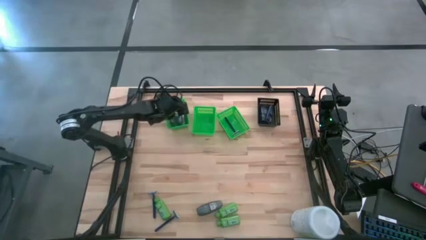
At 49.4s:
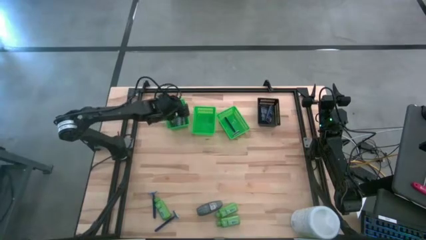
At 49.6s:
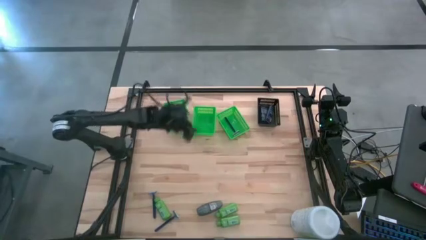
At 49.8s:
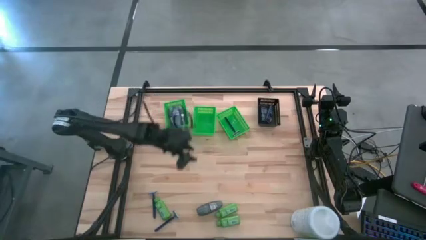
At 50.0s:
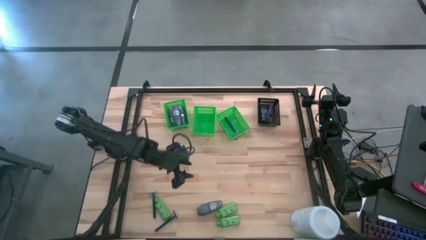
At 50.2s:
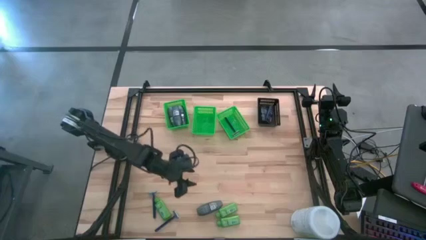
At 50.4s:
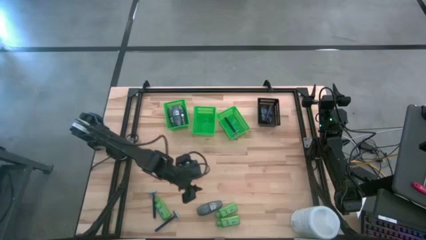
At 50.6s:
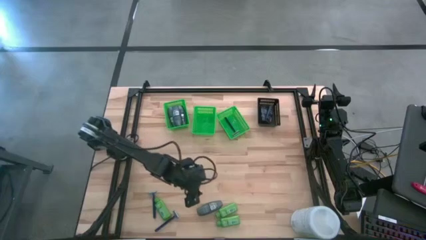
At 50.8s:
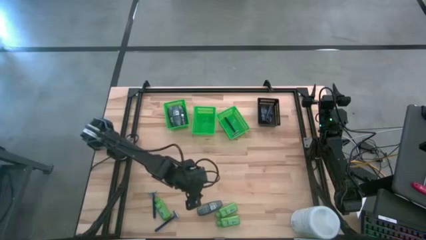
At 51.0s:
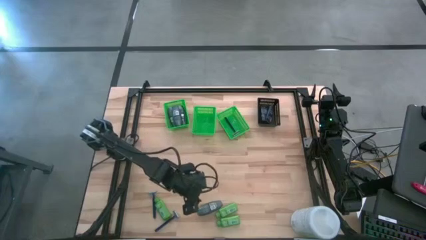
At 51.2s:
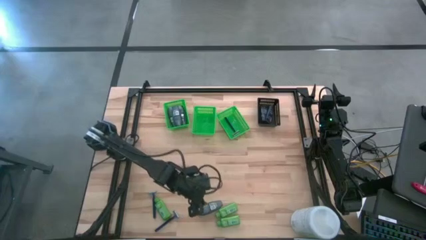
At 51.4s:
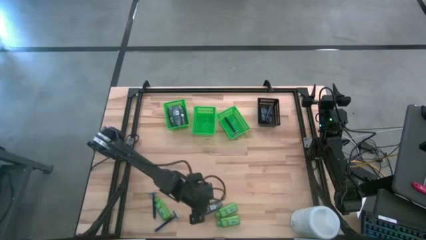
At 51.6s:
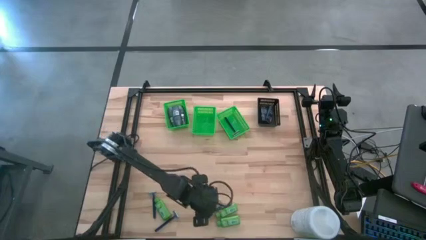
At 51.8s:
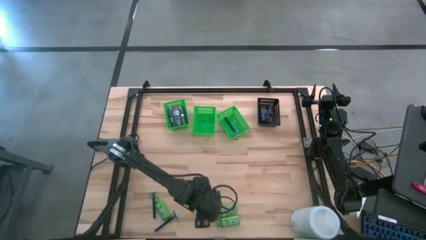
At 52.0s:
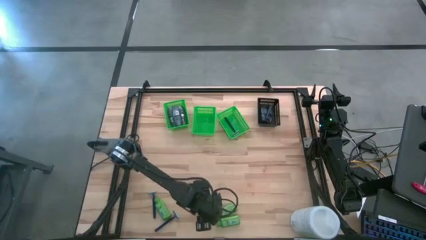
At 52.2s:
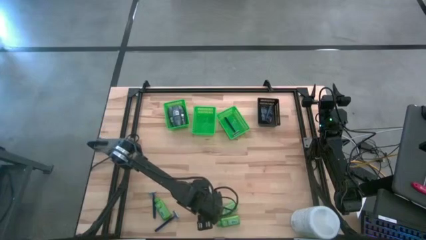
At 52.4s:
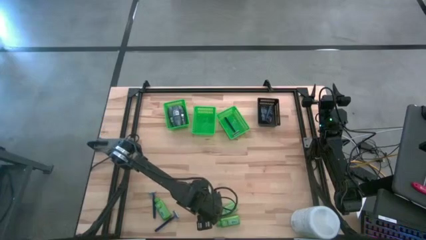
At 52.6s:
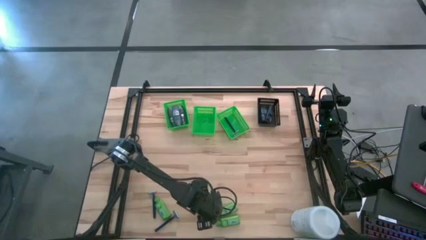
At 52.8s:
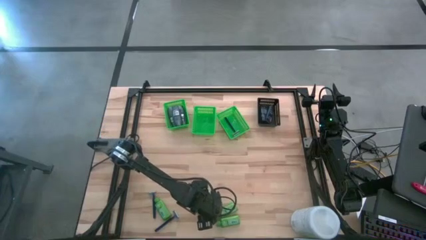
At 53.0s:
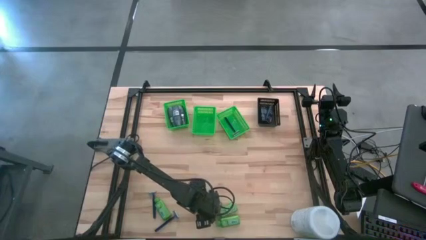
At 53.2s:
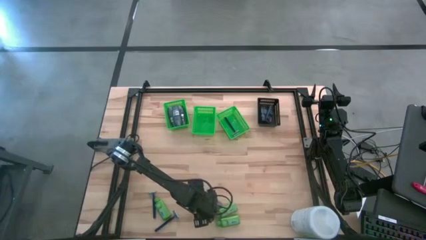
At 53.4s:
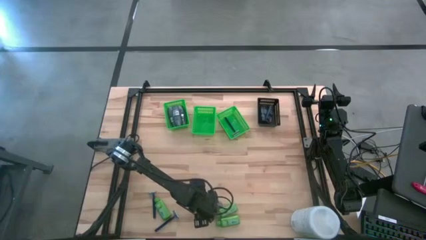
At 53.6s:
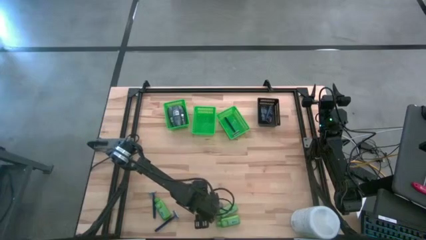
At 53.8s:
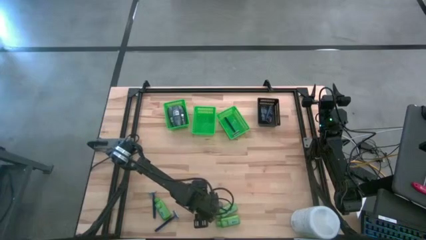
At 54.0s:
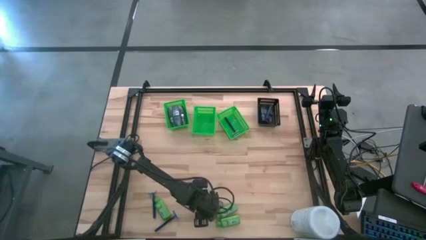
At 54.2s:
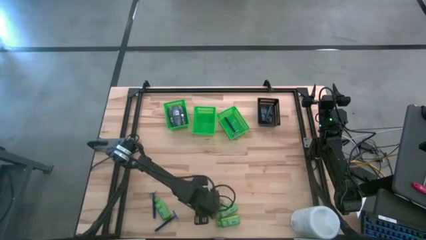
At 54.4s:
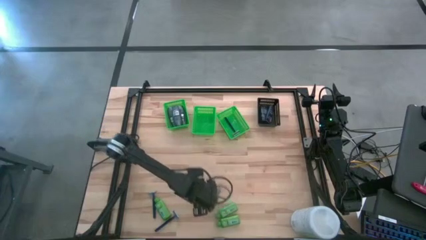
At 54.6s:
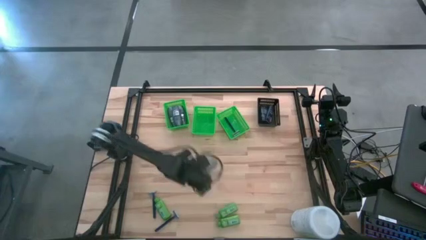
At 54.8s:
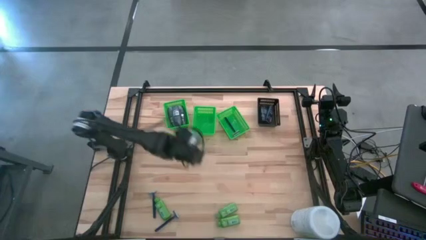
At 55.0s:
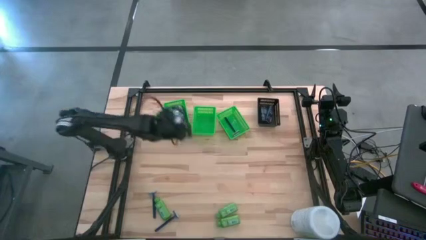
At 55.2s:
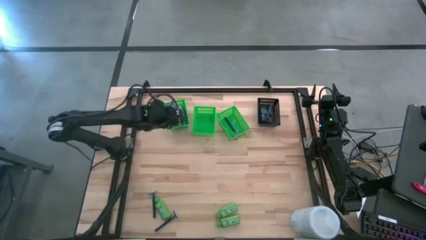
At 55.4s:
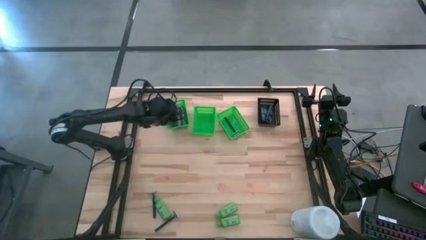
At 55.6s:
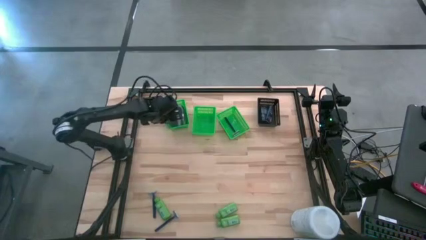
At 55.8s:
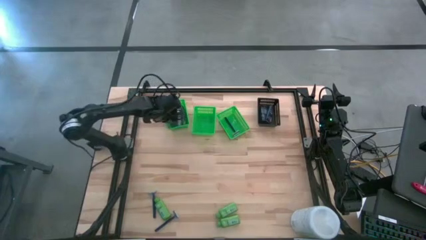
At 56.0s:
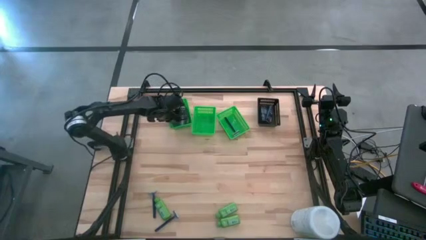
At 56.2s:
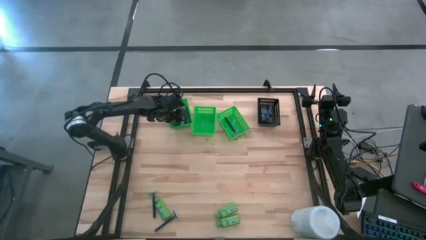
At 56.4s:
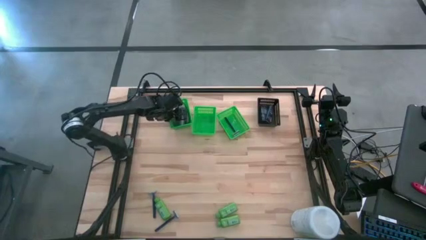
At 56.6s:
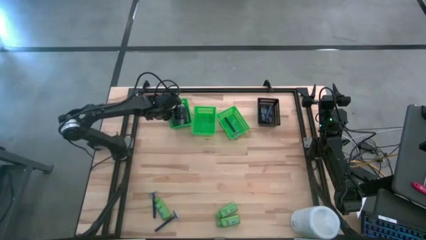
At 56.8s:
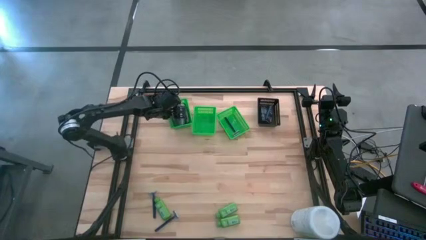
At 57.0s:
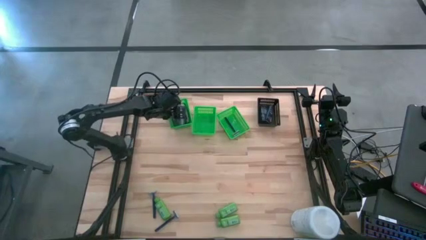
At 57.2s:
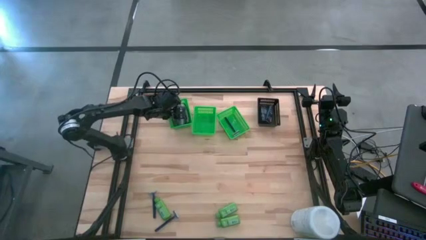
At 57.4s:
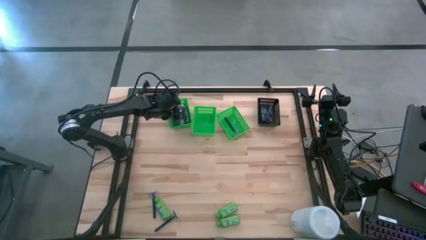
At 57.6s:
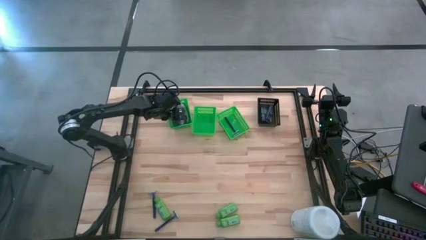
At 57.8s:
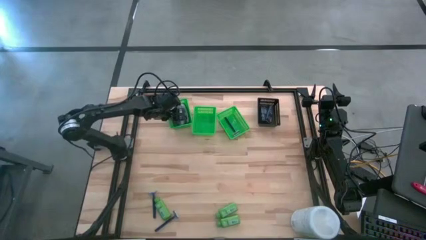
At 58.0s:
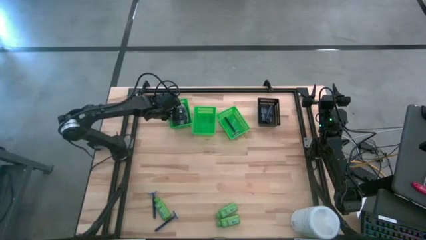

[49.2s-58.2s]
Task: Pick & Place Travel size toiletries
Put the deodorant into the left green bin

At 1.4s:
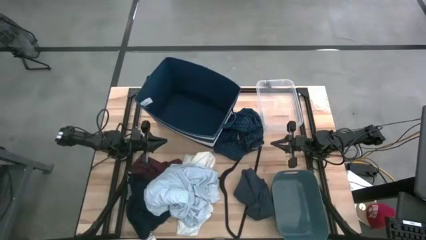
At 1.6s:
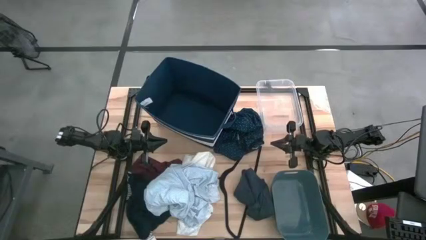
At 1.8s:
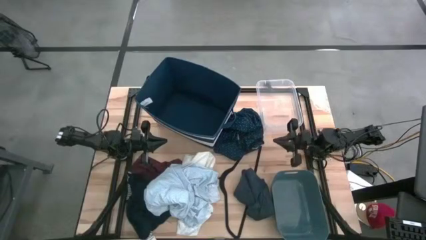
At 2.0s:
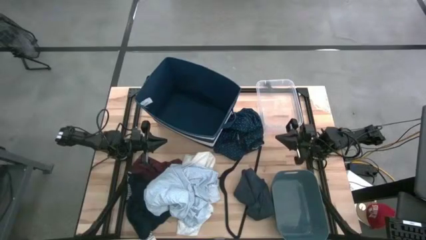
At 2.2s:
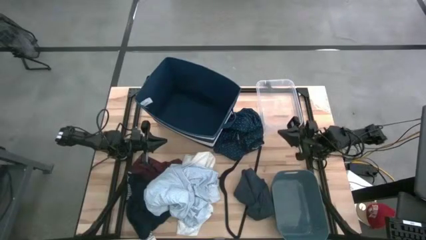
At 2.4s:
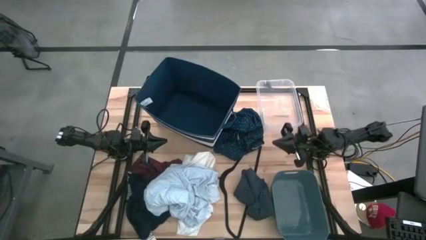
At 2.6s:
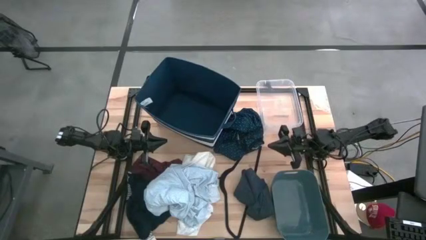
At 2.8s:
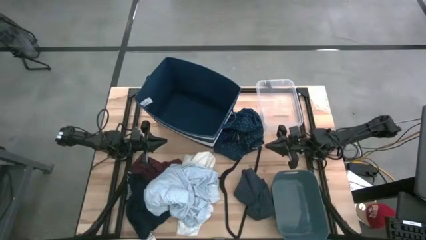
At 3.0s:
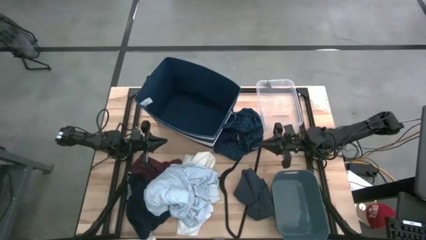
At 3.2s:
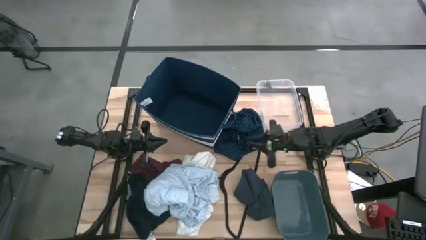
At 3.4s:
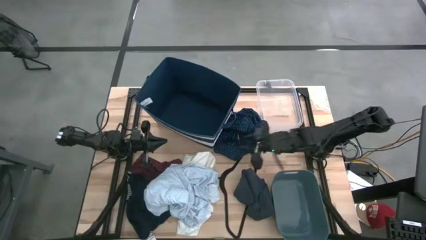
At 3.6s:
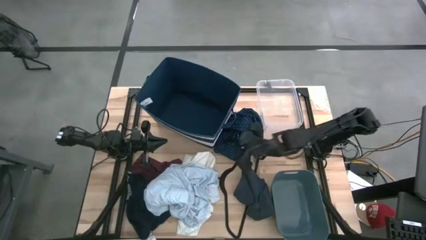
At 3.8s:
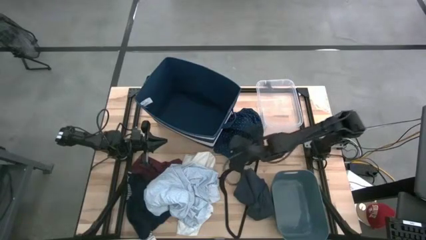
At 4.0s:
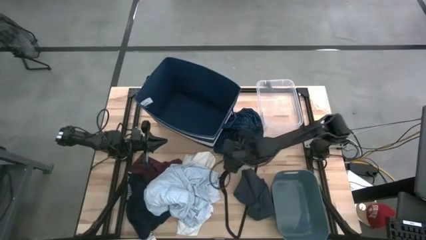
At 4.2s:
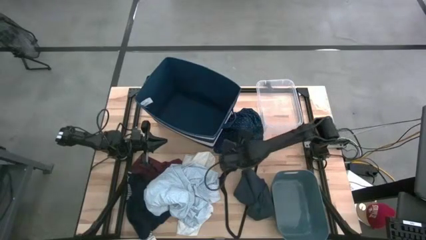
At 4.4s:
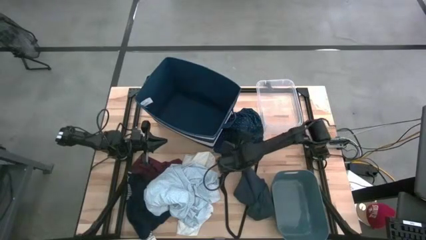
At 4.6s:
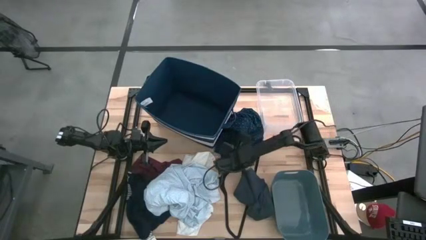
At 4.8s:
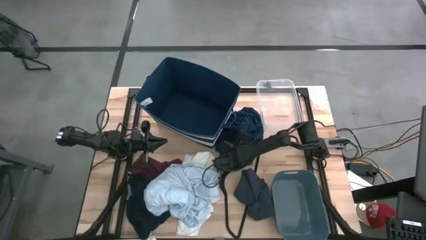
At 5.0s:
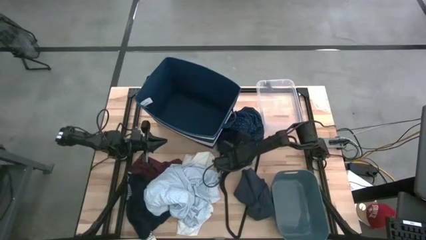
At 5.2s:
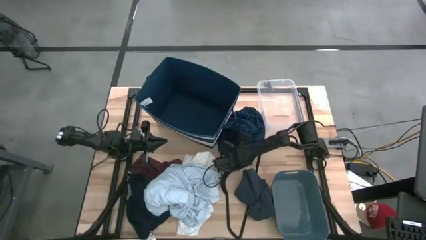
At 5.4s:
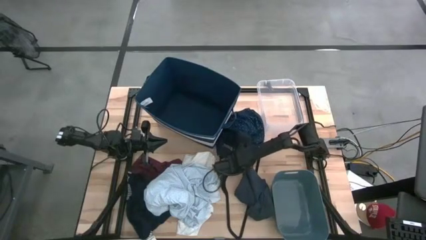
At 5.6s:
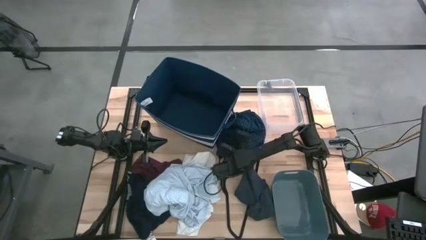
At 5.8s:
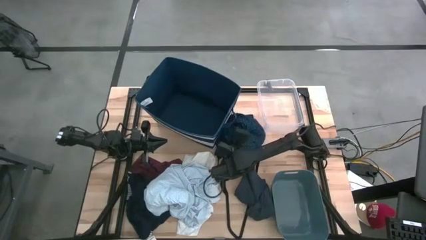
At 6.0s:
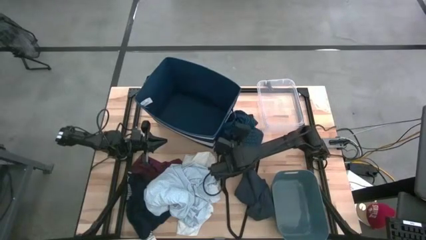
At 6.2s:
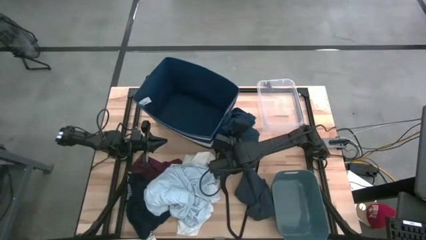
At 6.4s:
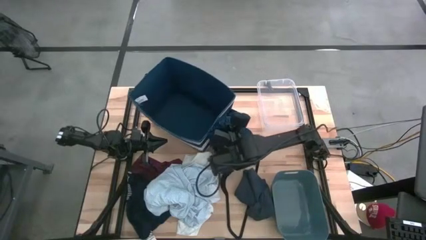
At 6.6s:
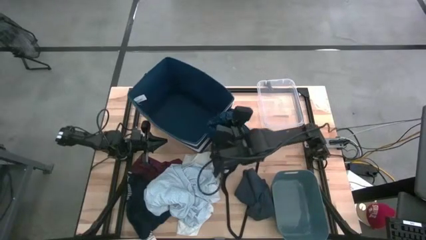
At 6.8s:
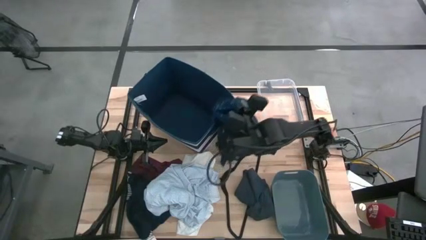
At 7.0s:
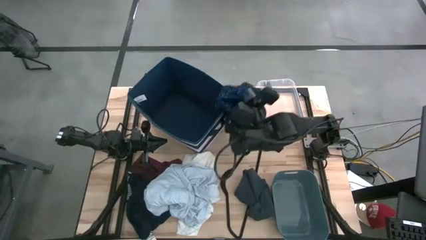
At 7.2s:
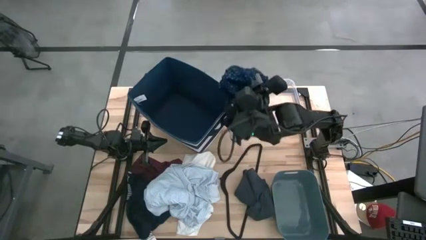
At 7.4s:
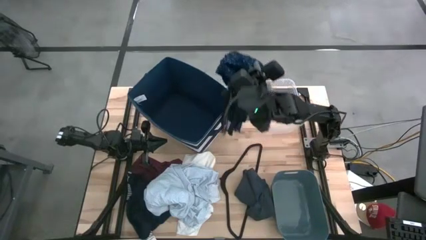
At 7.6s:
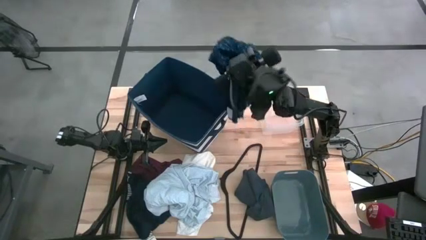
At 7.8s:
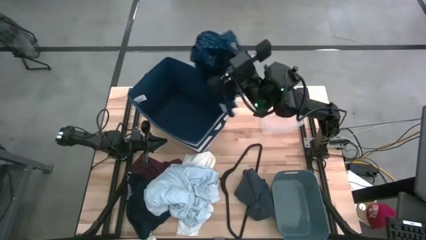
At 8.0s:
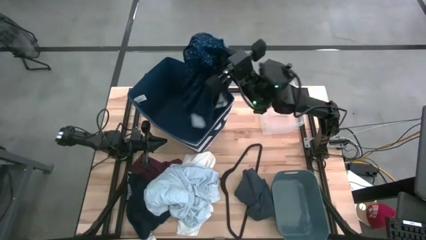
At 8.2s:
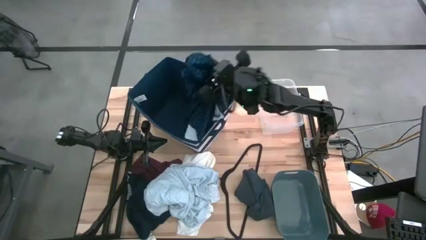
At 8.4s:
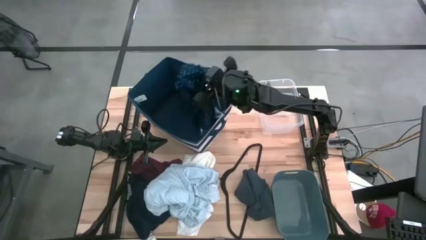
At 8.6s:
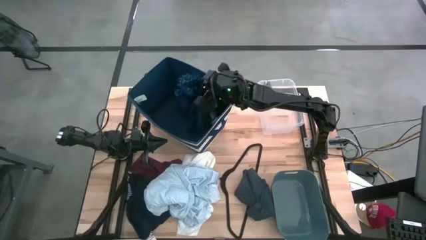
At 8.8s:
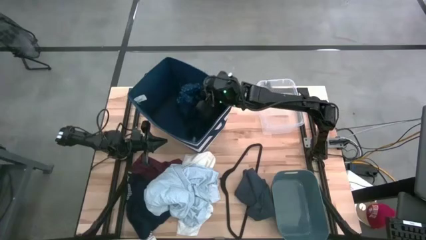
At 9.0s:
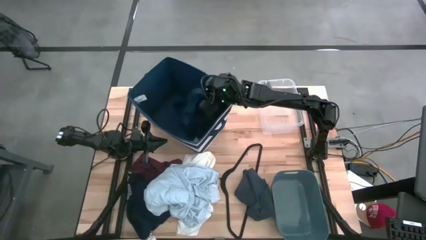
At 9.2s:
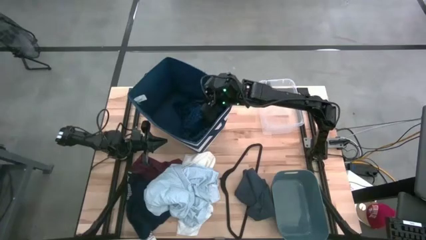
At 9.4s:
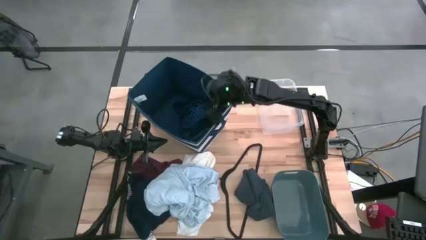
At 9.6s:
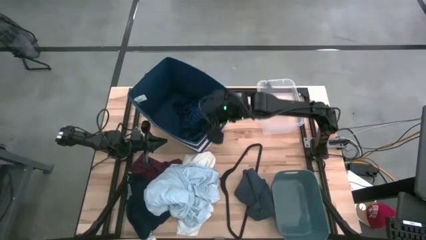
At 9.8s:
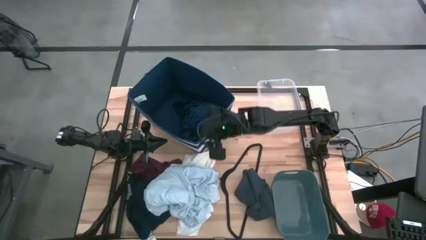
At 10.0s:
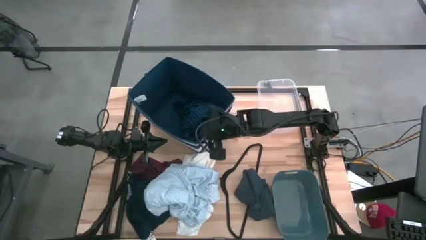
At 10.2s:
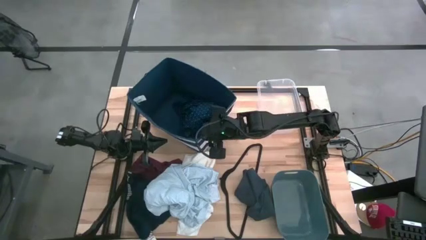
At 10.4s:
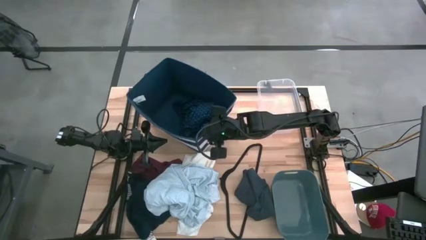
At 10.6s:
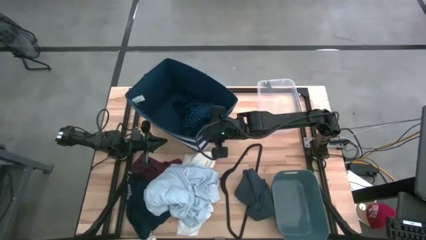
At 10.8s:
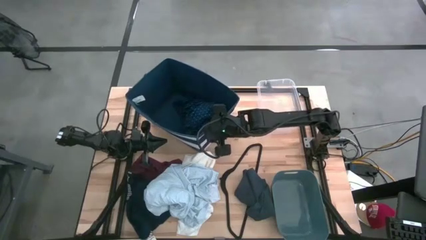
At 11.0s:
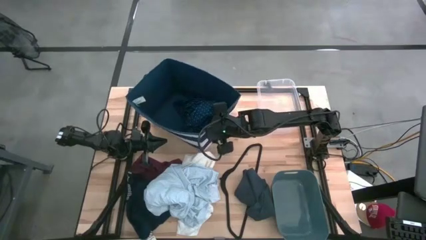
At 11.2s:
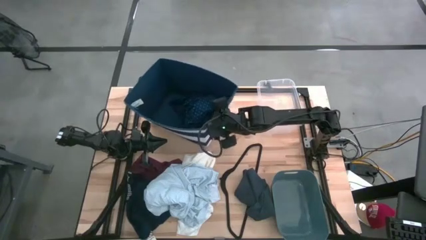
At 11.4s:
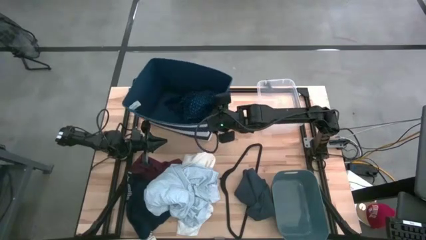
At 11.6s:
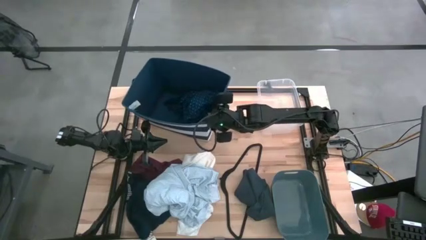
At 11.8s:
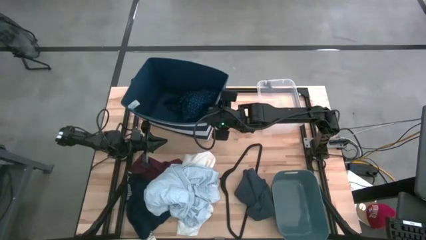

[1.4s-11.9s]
Task: Pick & Place Cloths
Put the dark blue polo shirt into the blue bin
